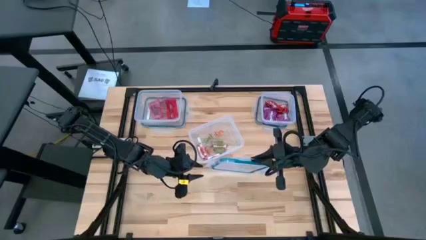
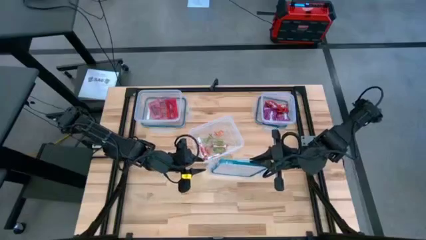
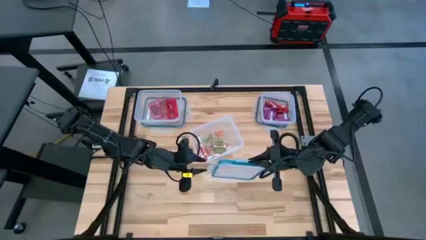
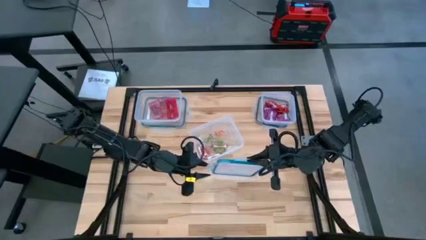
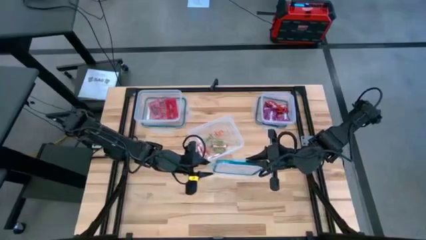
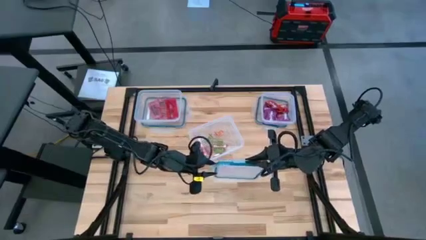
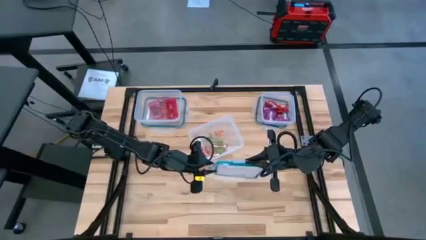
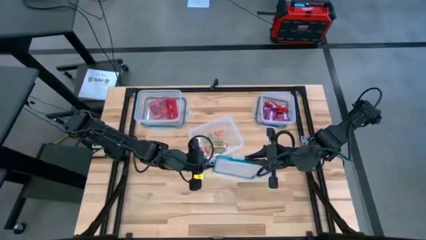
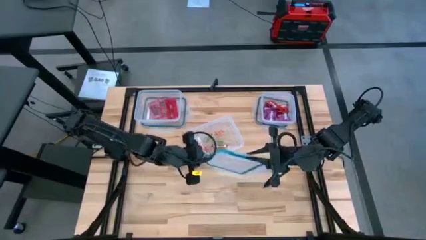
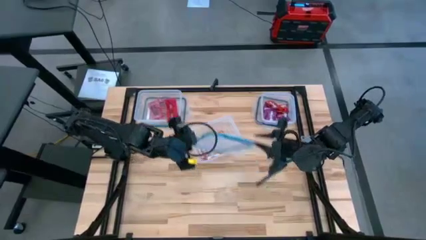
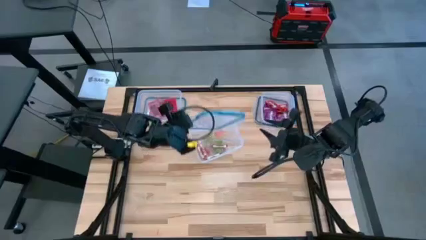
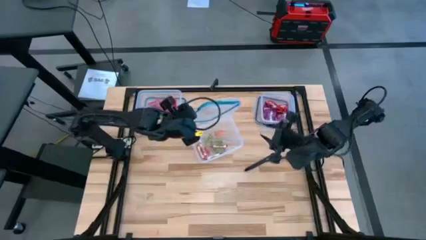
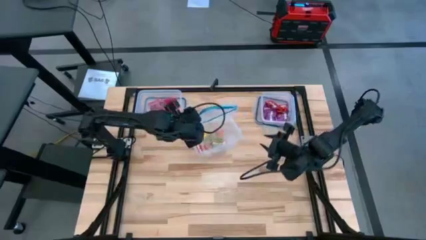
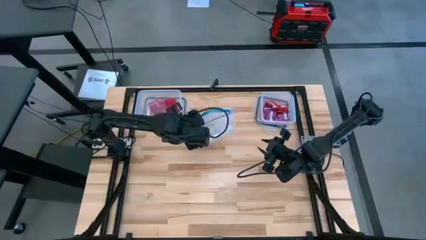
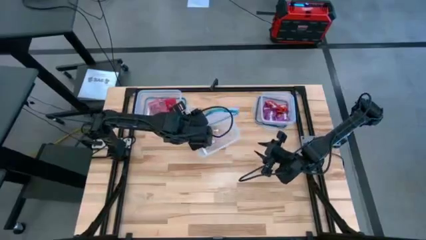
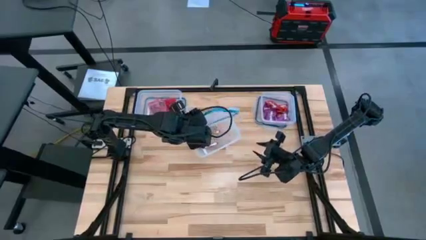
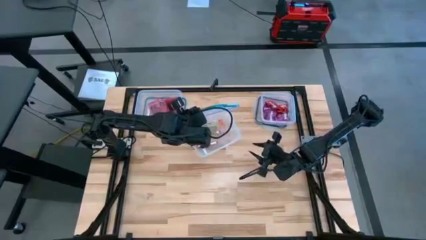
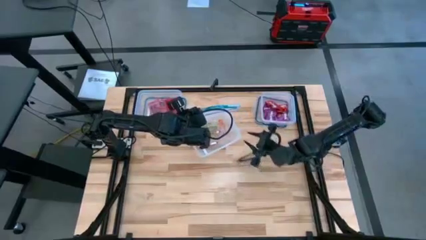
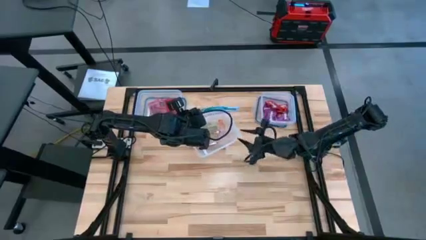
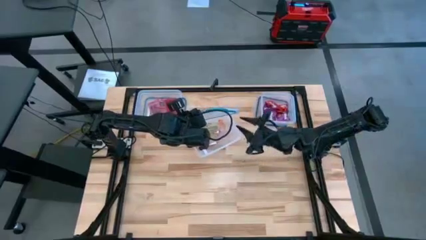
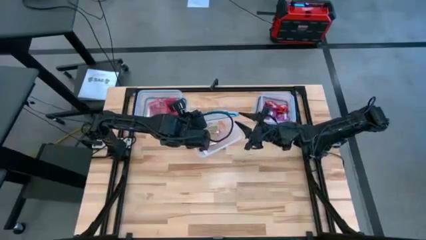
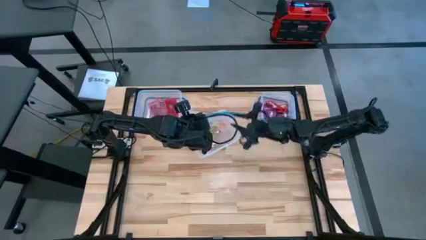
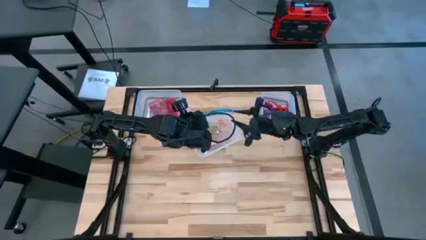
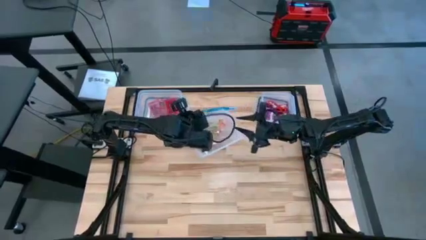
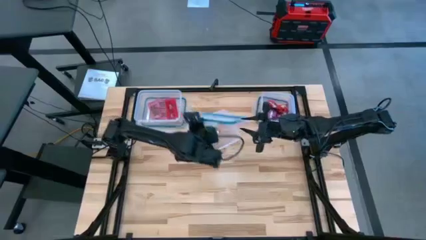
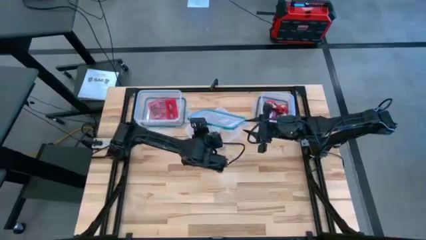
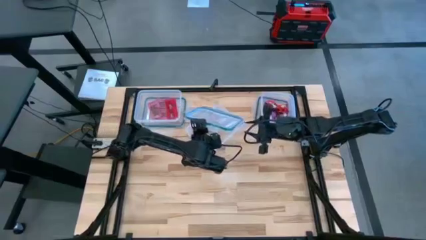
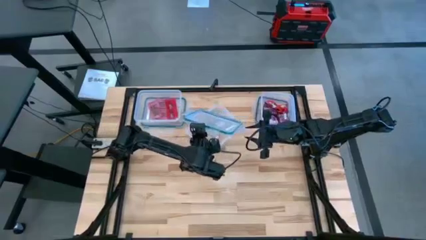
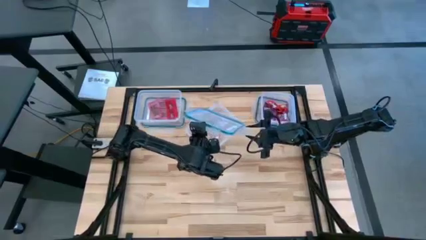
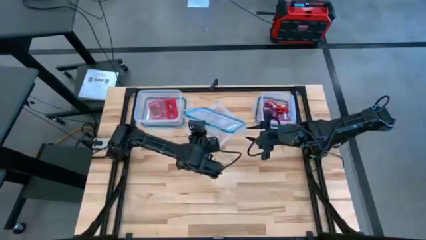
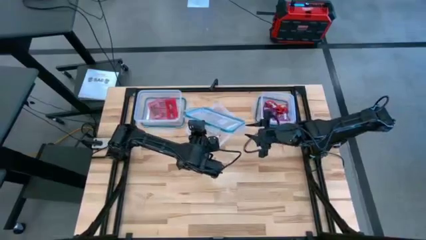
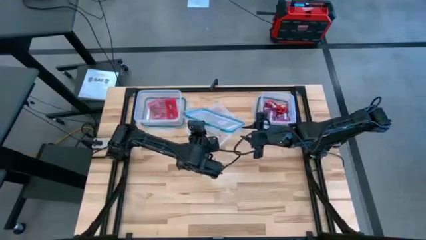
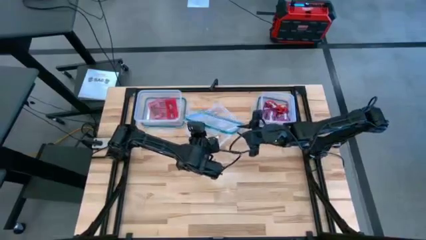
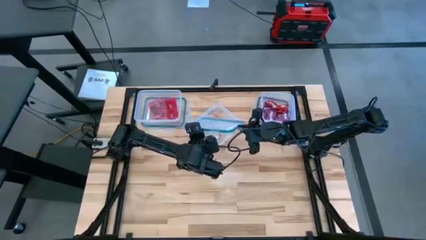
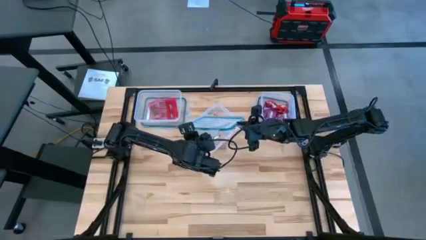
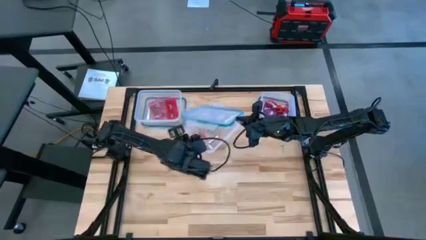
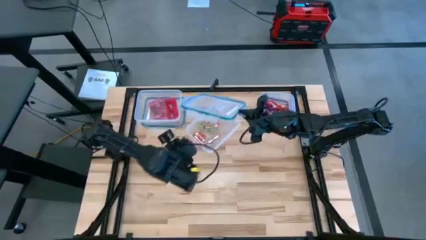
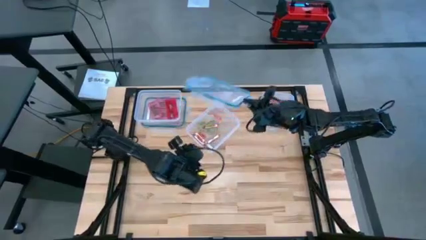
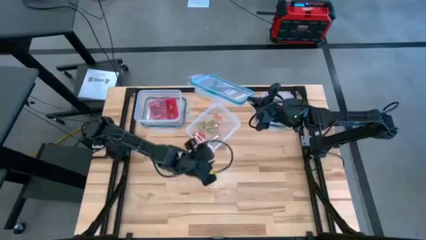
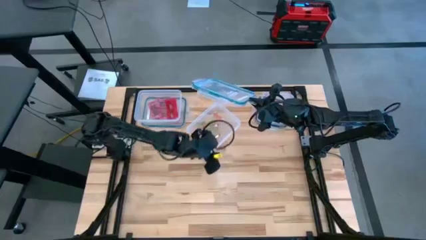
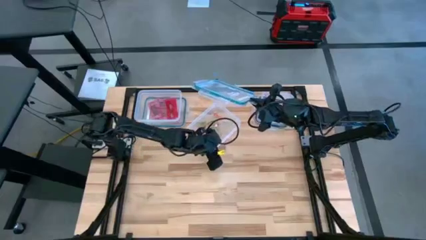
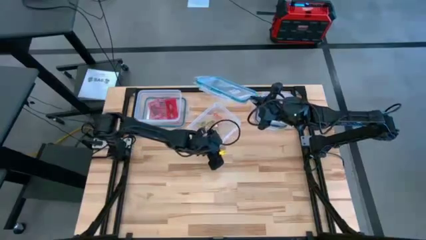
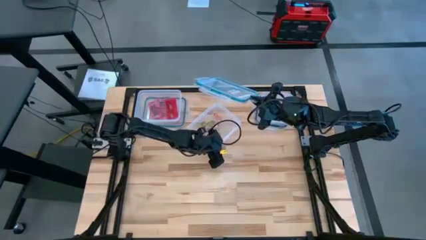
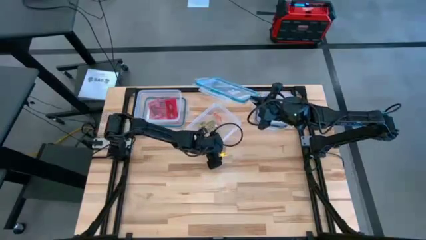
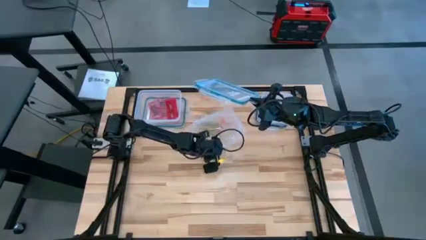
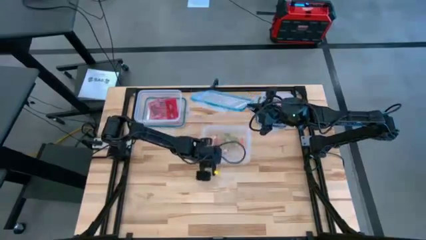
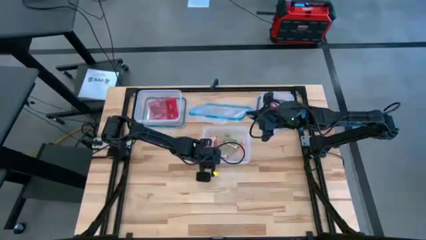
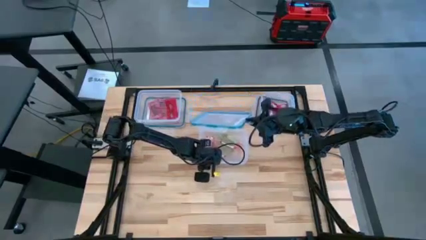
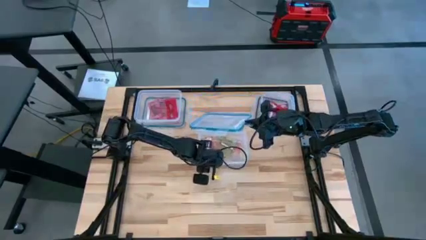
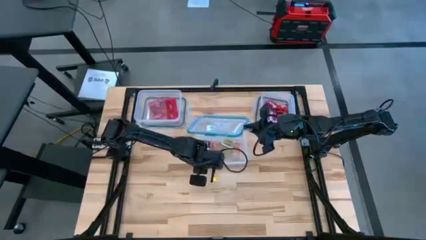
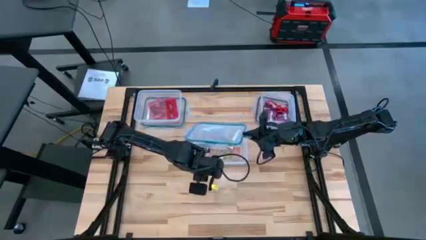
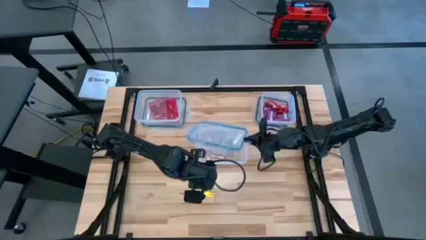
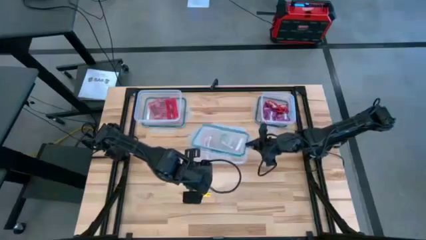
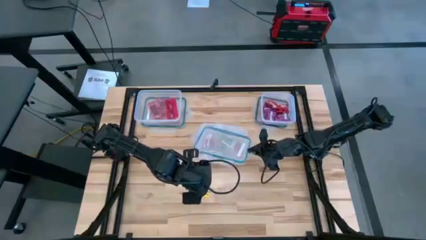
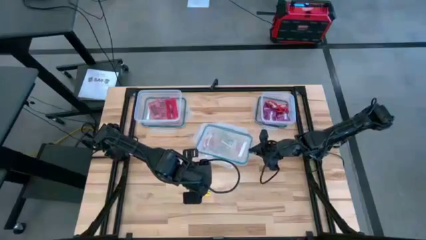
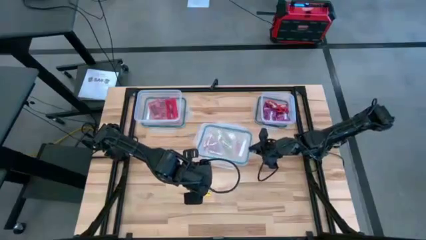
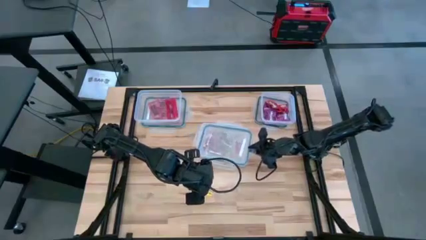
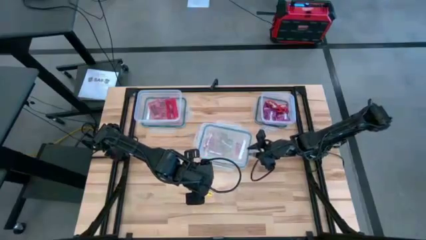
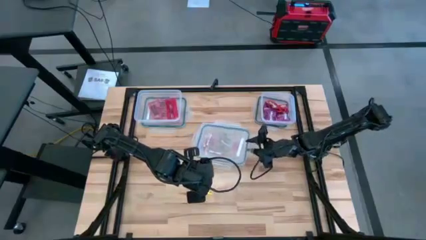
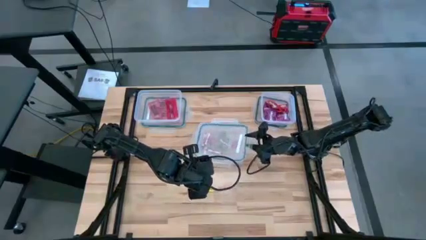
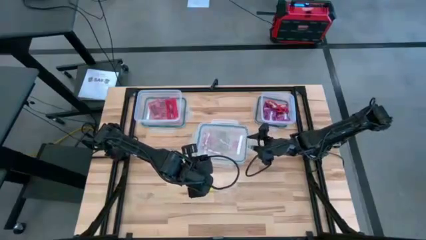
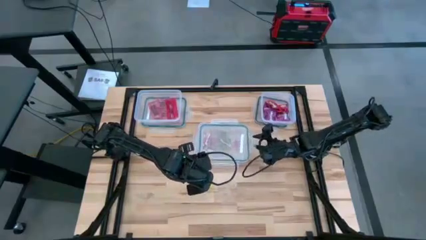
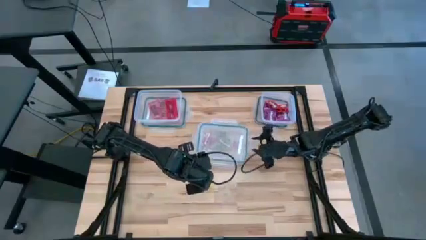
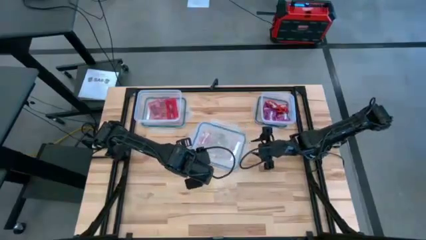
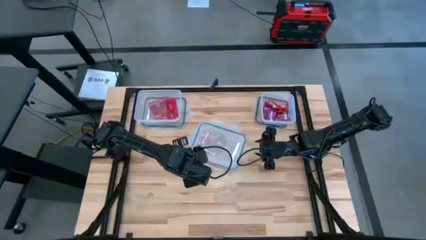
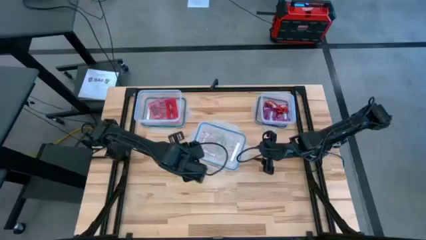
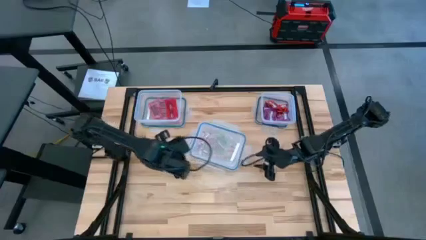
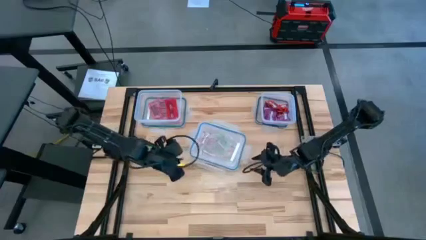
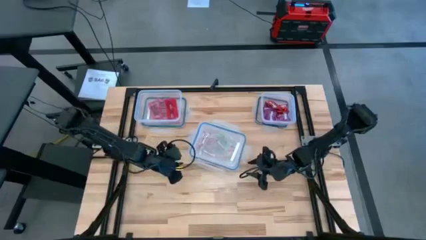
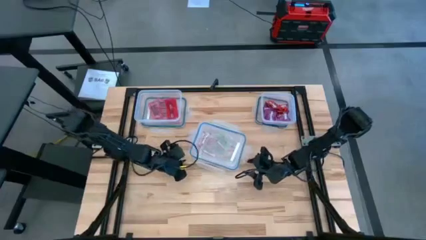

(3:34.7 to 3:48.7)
Task: Sort candy
Close the center transparent bin
